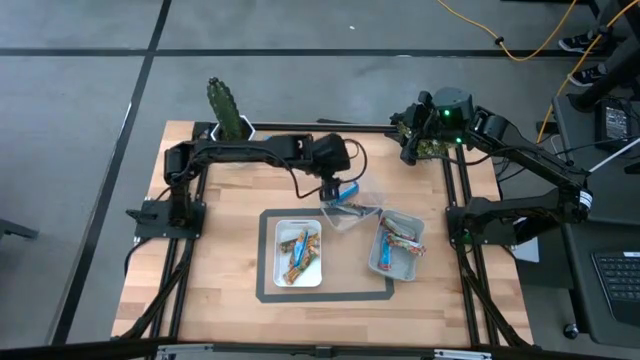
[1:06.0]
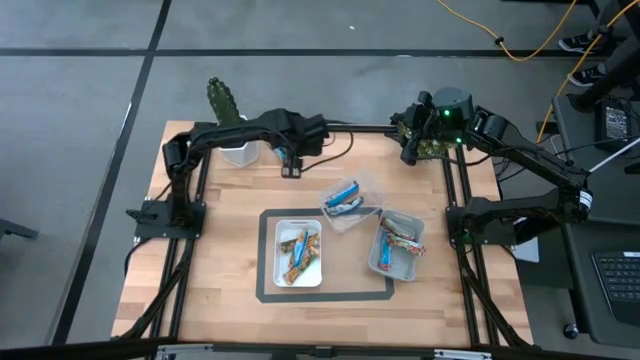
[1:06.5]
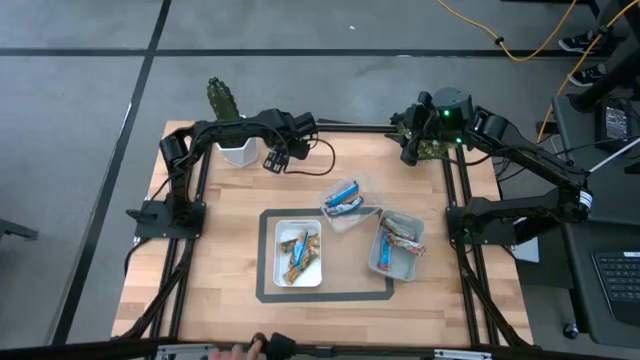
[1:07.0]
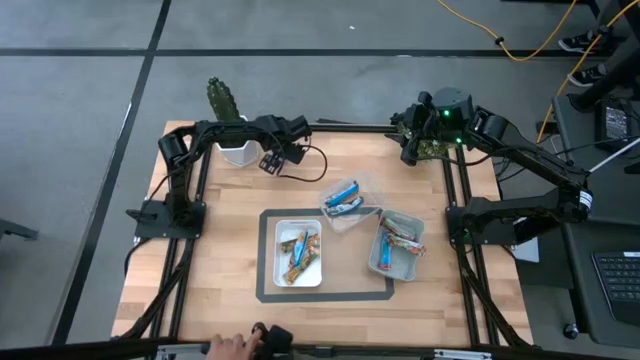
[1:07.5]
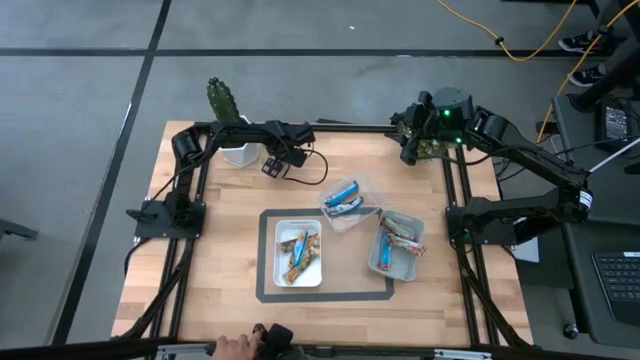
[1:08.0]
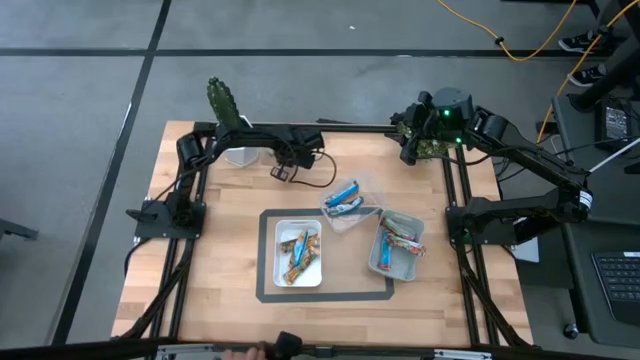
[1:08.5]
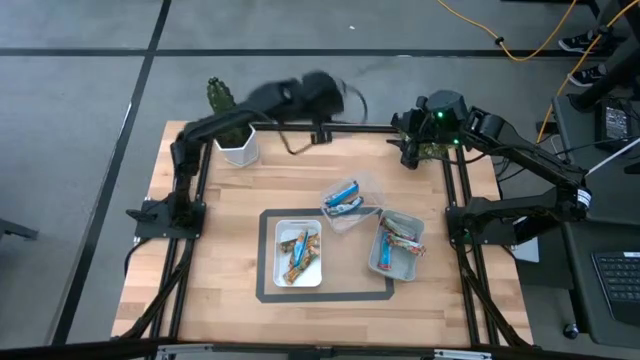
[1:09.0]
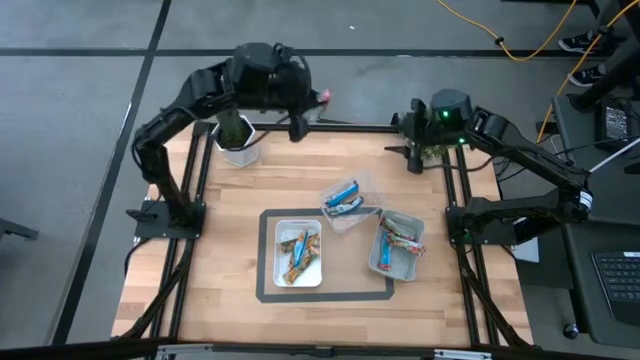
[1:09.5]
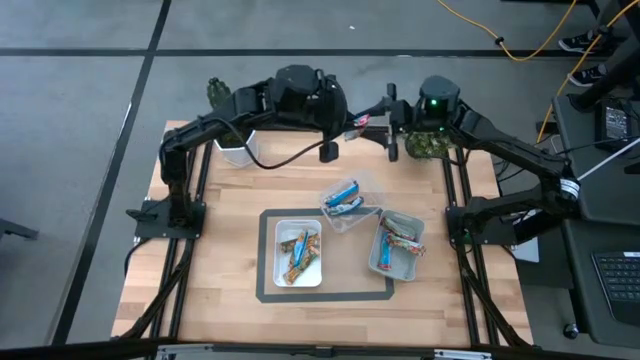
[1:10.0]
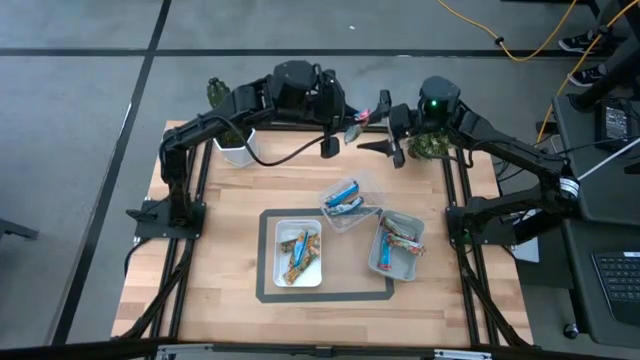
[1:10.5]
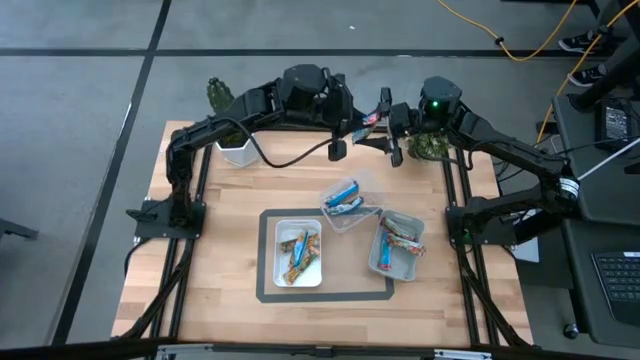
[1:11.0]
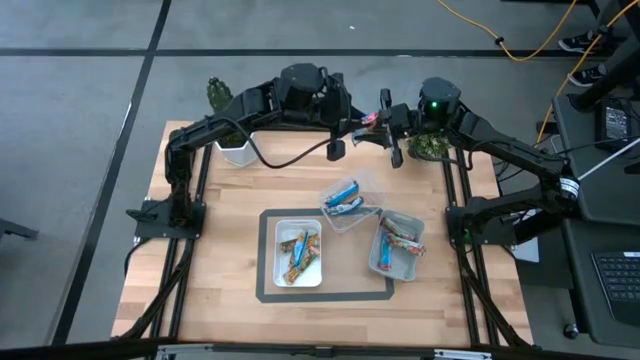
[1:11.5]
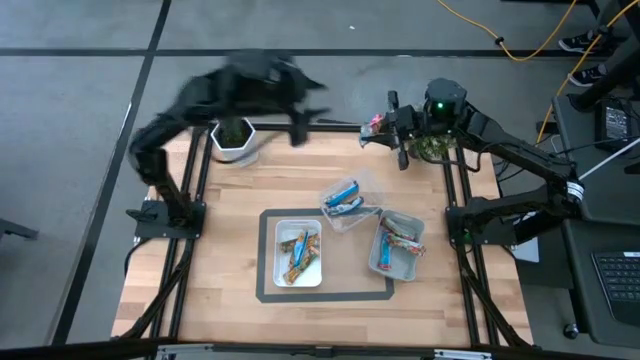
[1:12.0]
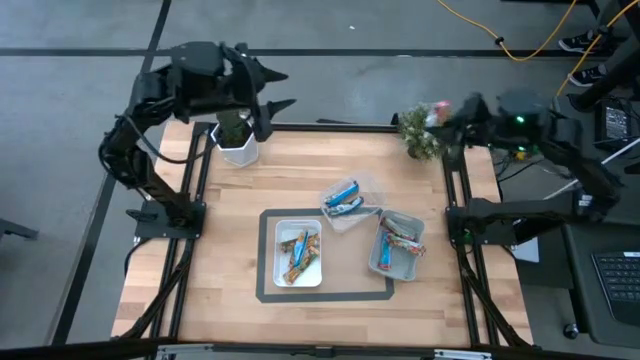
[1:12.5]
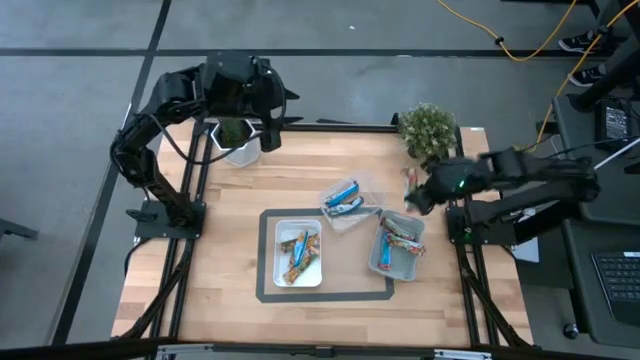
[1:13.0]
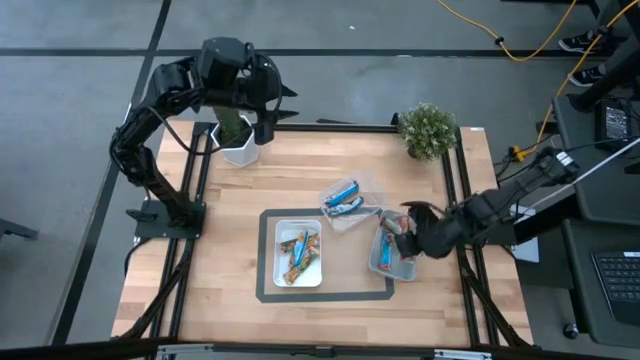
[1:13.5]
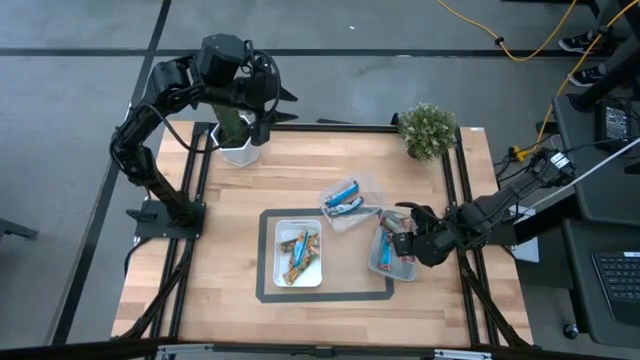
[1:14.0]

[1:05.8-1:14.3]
Task: Pick and place Granola Bars by type
Put the red granola bar into the gray bin

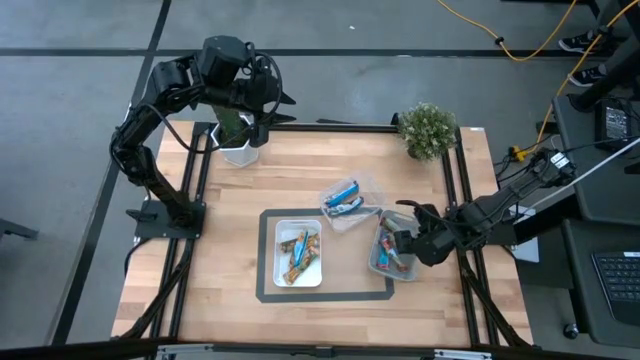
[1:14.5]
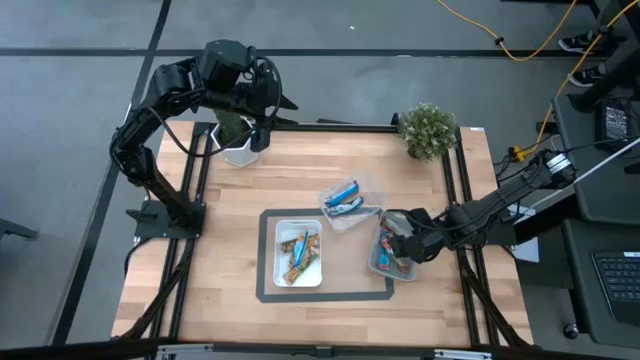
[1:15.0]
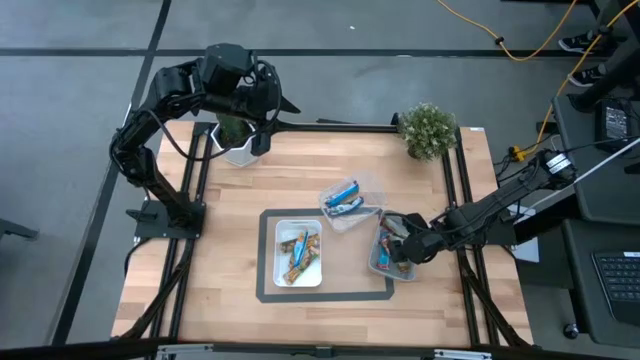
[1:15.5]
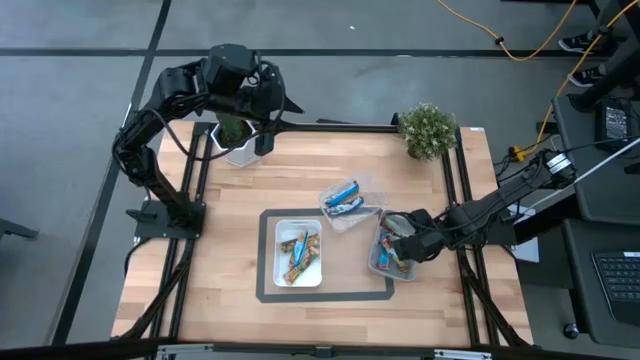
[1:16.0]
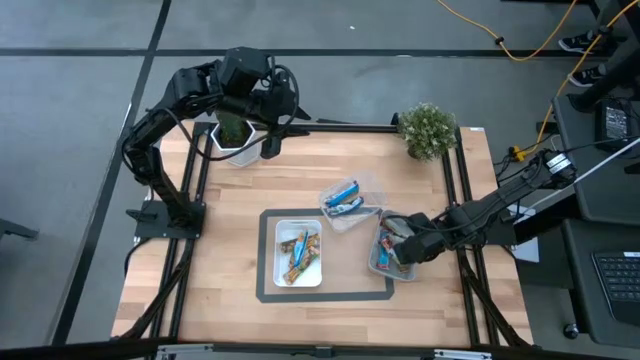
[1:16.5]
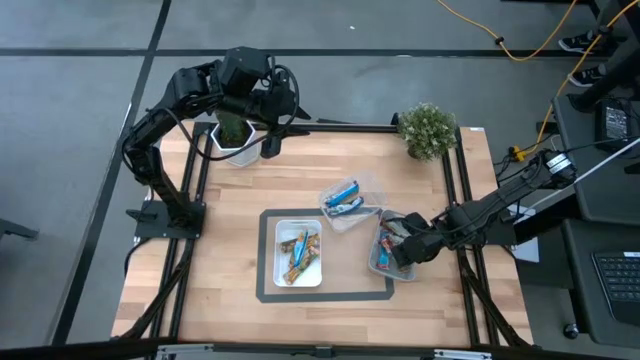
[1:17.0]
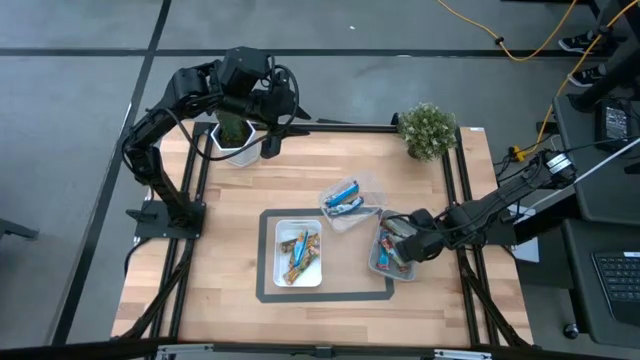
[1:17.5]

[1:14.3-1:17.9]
Adjust the red granola bar

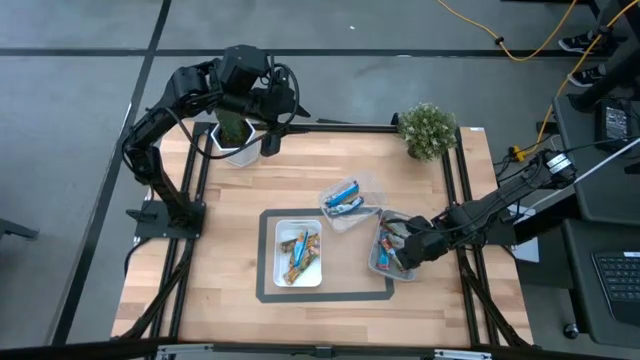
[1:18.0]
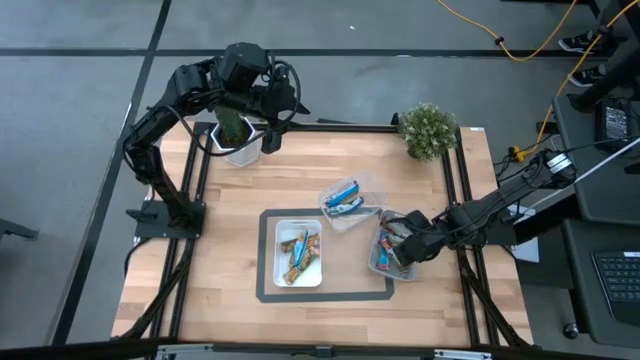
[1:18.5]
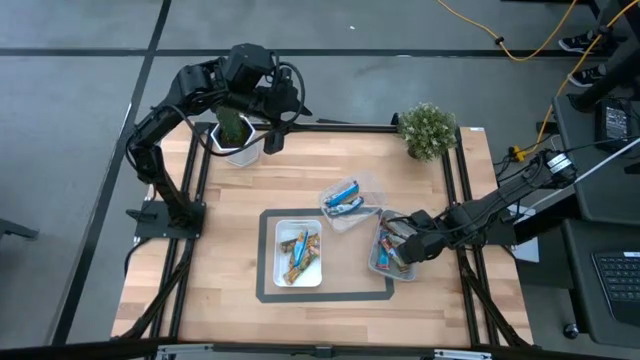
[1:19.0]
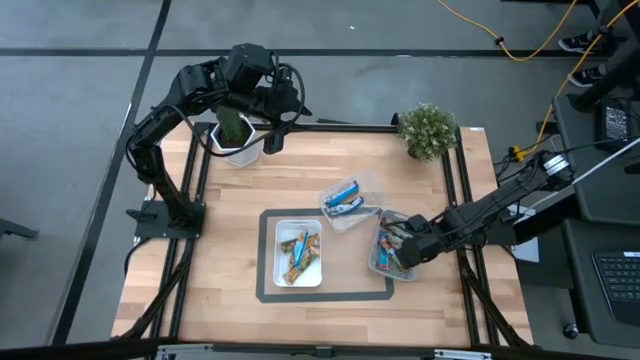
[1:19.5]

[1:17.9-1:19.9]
Adjust the red granola bar

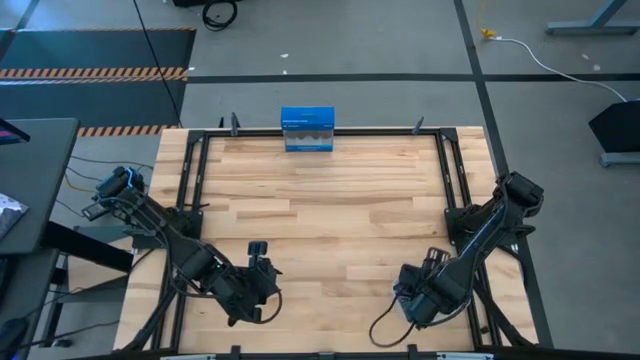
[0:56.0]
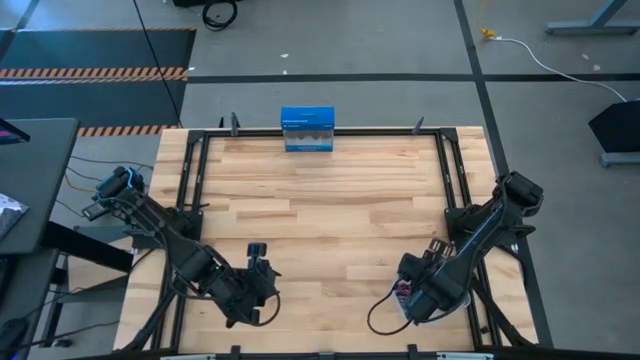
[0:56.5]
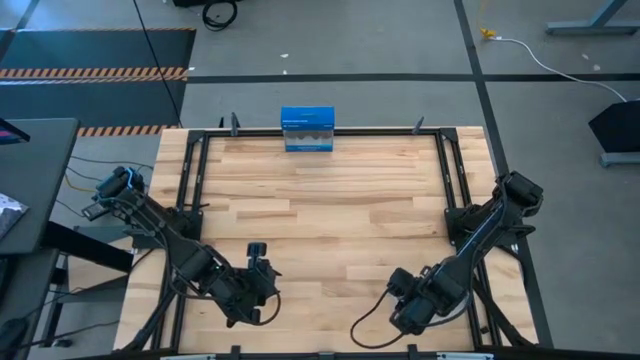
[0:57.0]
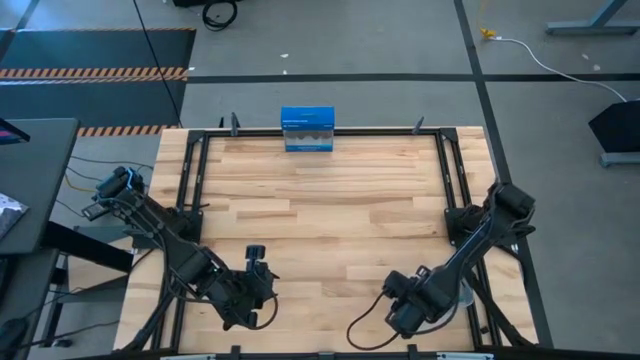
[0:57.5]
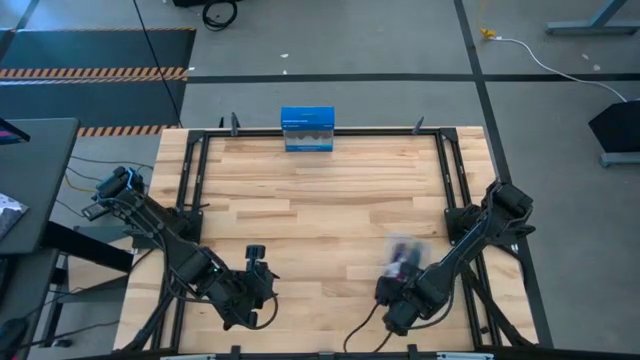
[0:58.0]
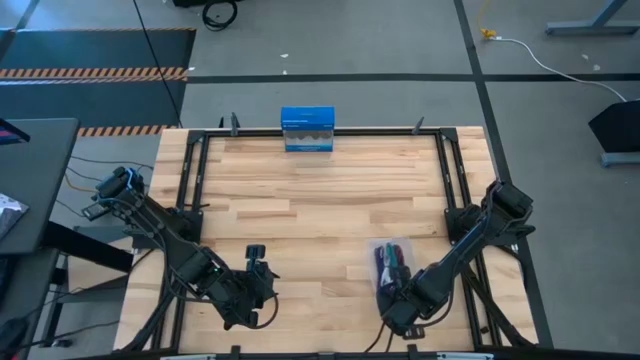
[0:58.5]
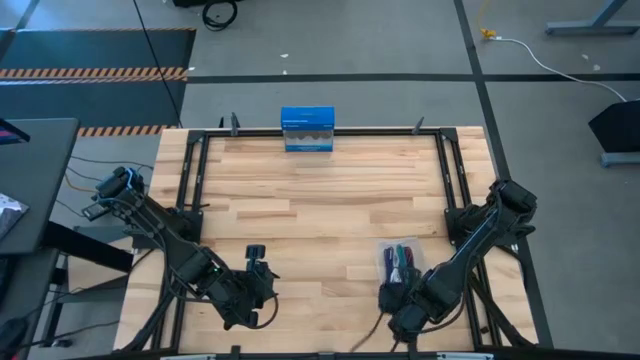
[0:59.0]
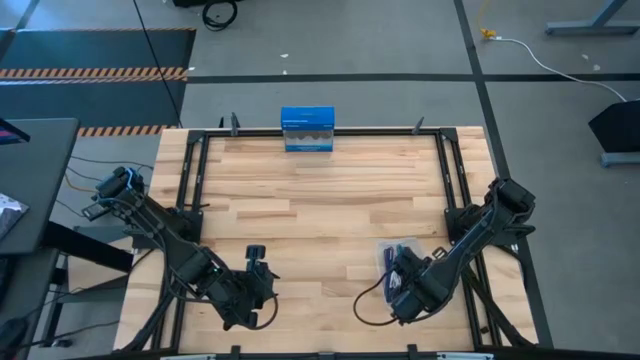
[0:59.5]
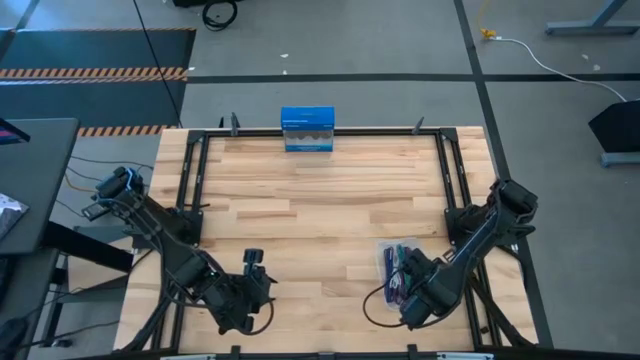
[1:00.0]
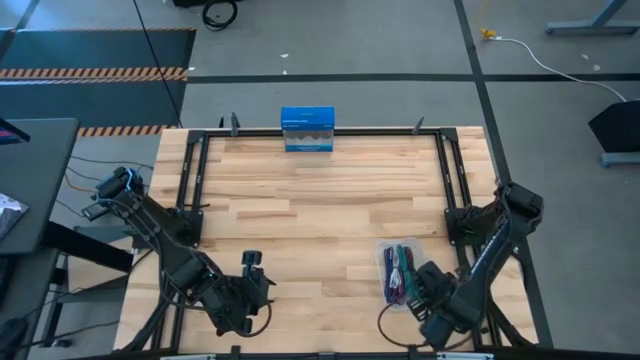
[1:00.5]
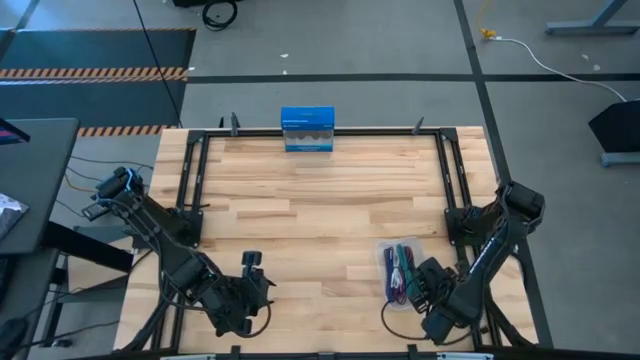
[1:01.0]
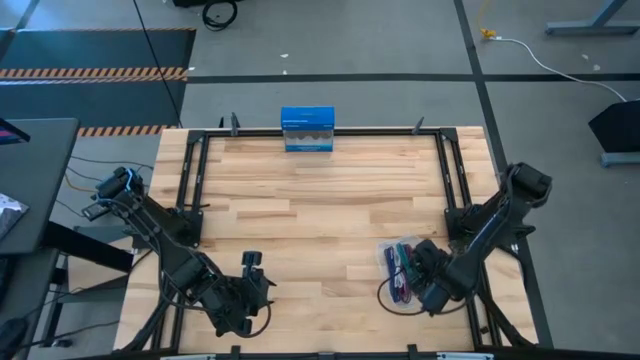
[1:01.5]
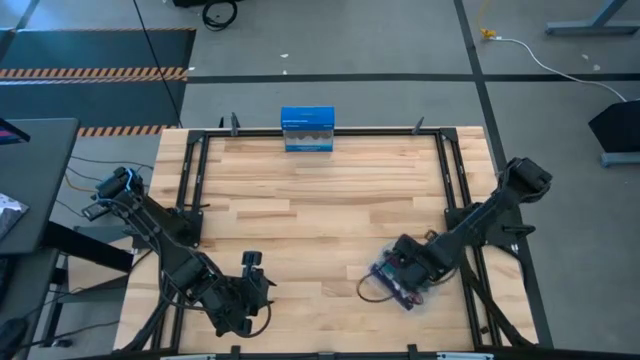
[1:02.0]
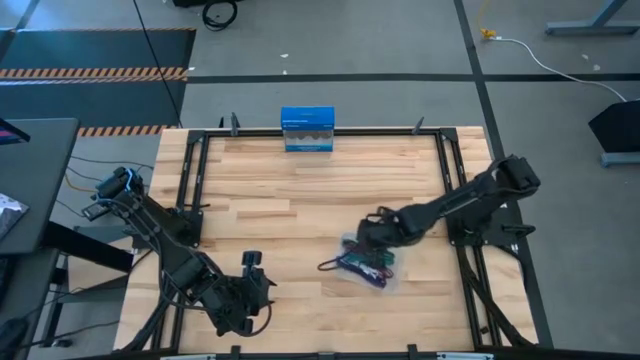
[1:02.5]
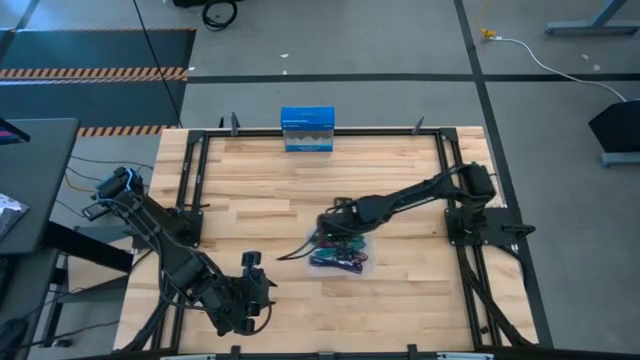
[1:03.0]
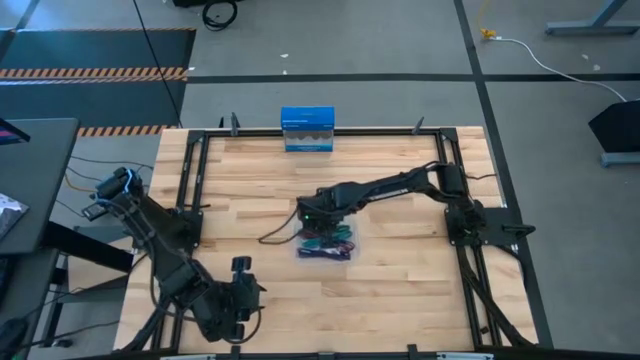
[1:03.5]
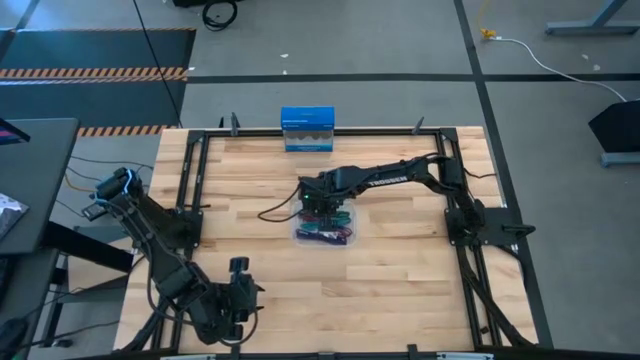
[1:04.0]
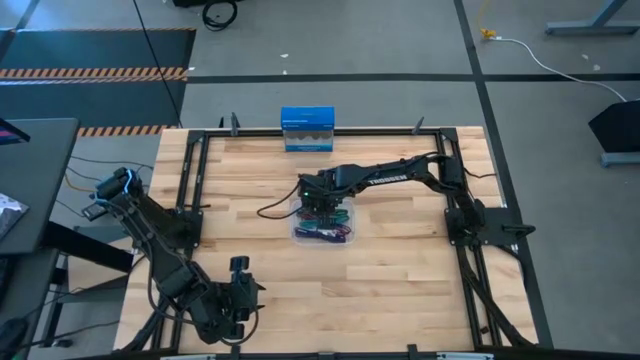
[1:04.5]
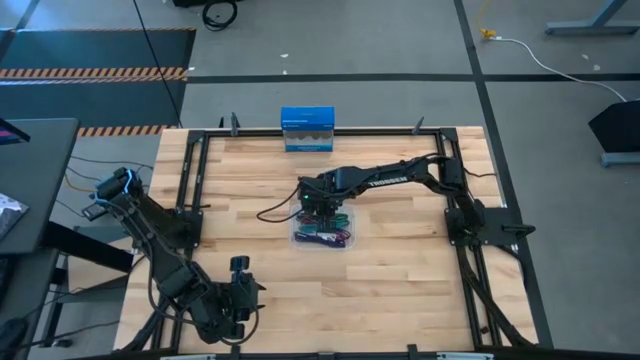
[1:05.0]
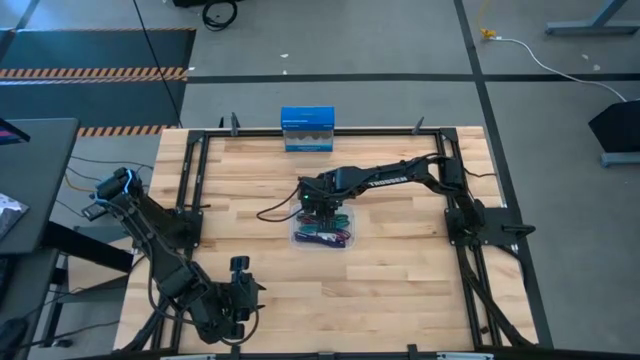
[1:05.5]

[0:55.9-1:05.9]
Task: Pick and place USB-C Cables
Move the transparent bin to the center of the table
